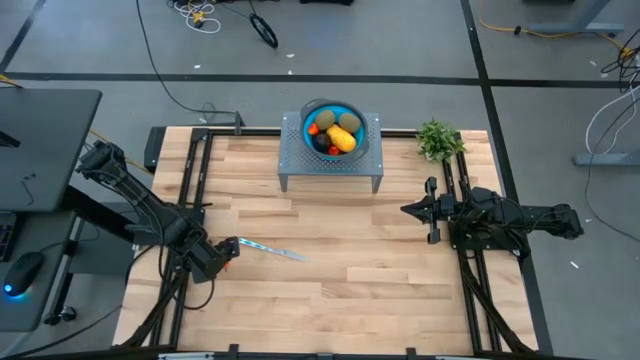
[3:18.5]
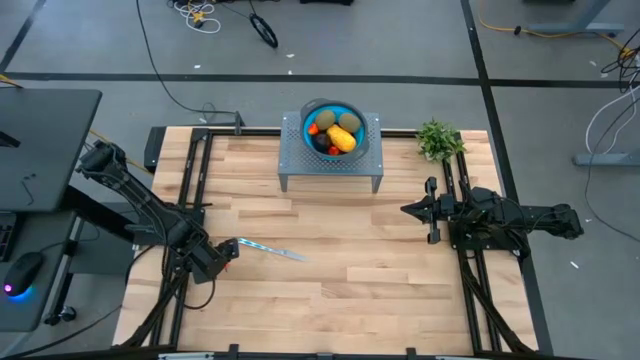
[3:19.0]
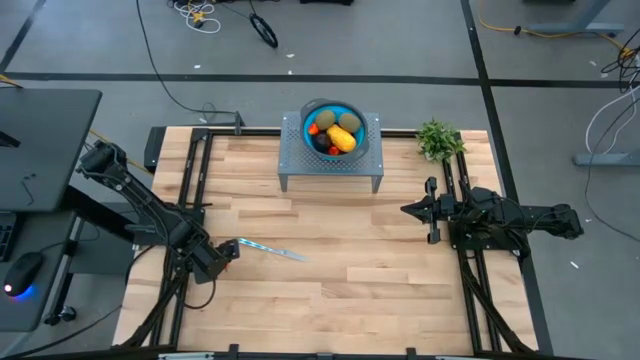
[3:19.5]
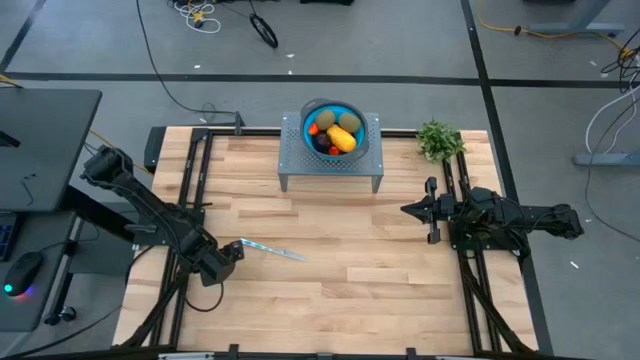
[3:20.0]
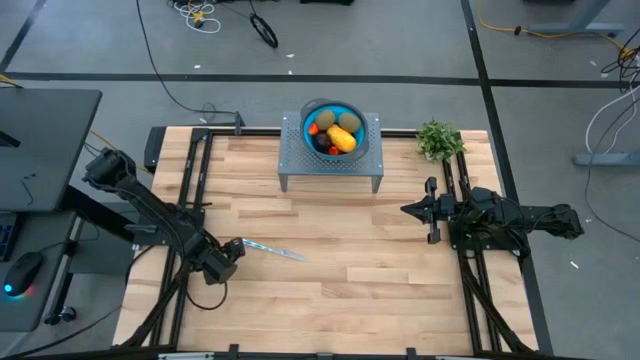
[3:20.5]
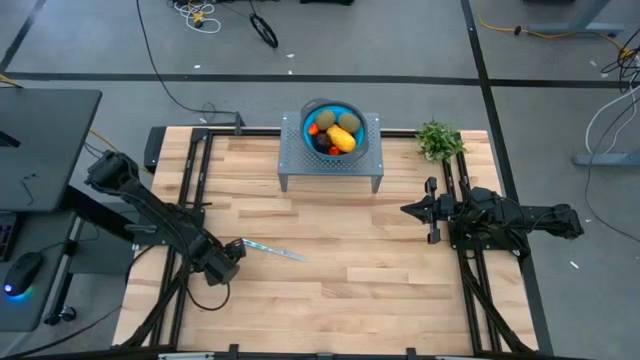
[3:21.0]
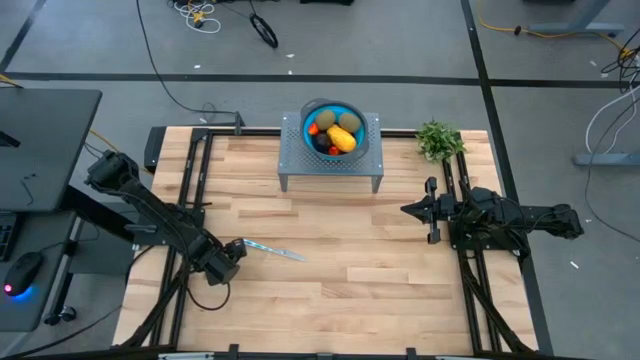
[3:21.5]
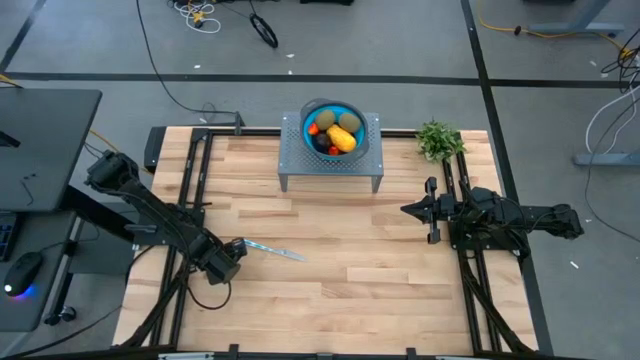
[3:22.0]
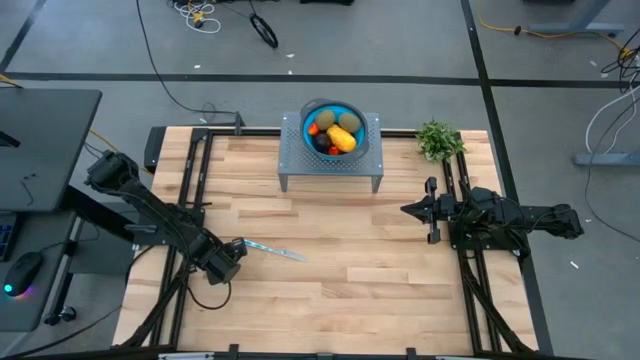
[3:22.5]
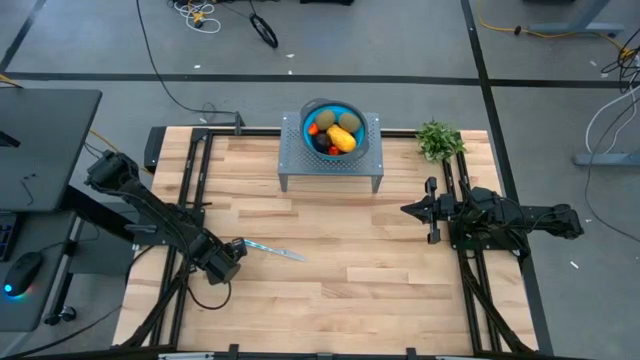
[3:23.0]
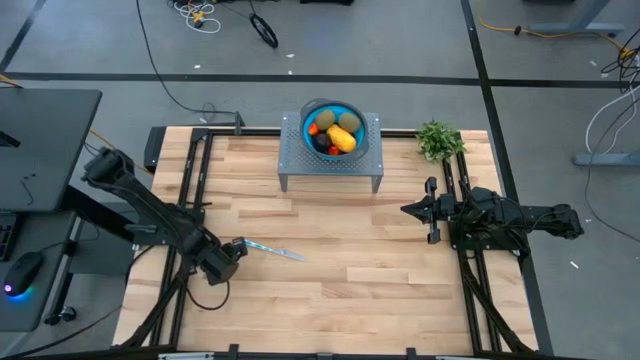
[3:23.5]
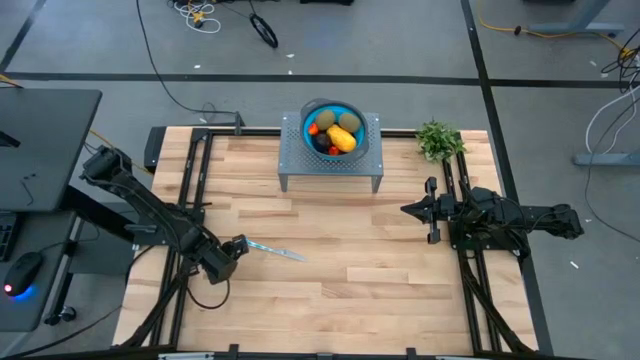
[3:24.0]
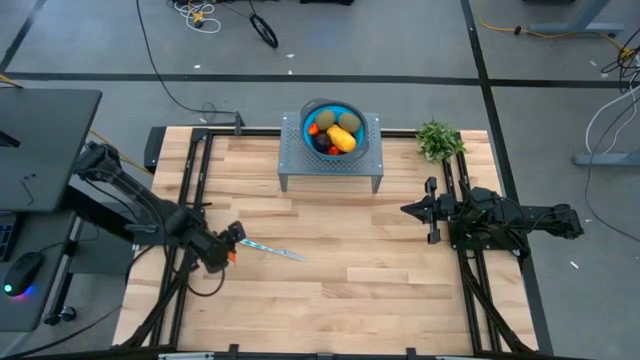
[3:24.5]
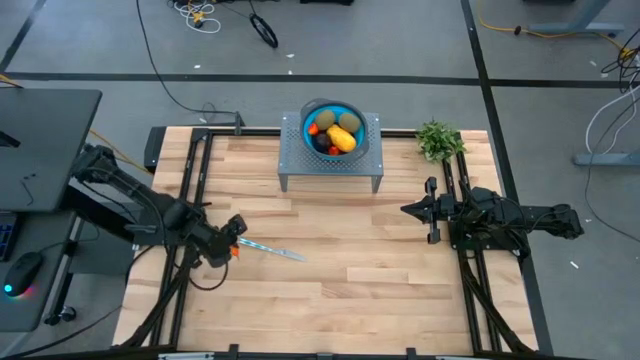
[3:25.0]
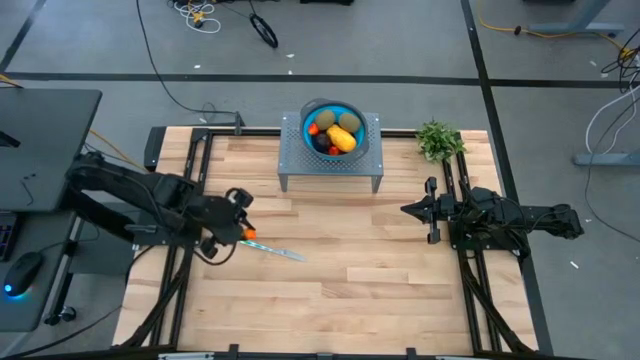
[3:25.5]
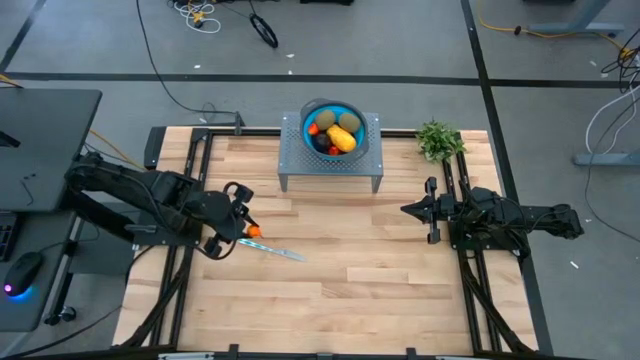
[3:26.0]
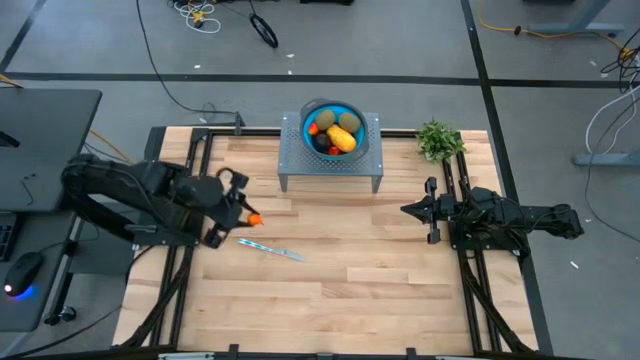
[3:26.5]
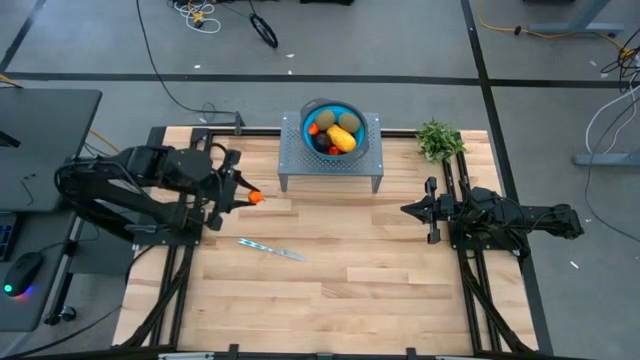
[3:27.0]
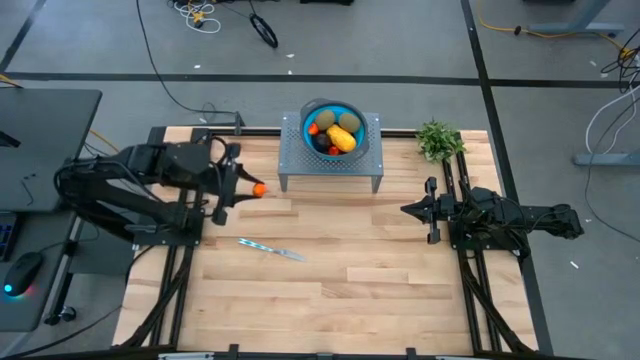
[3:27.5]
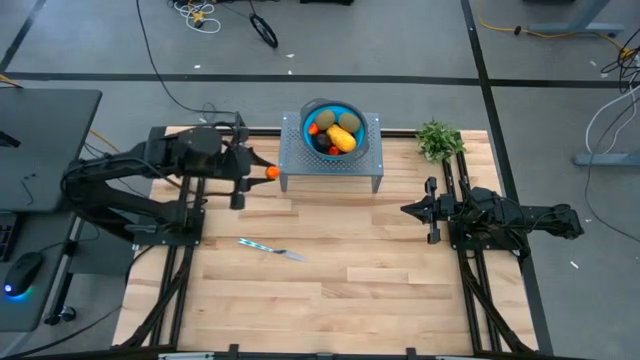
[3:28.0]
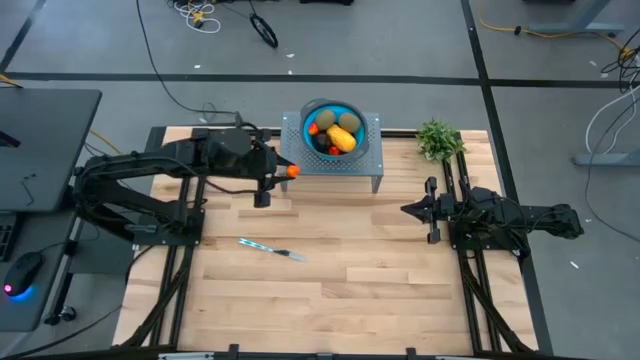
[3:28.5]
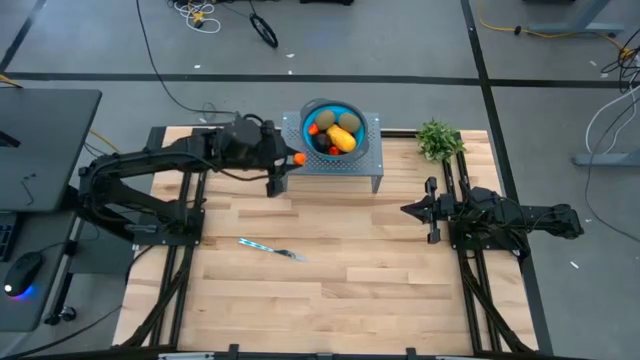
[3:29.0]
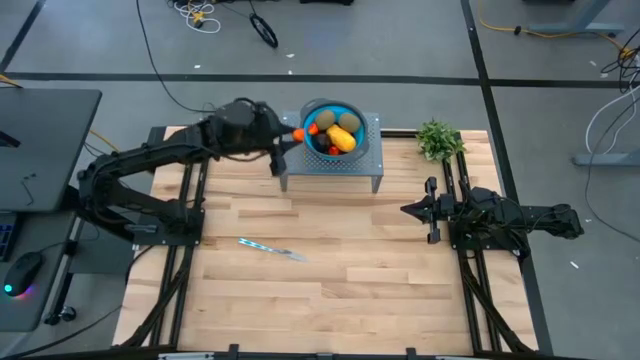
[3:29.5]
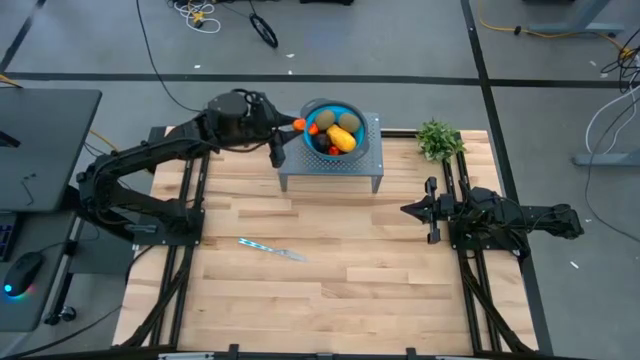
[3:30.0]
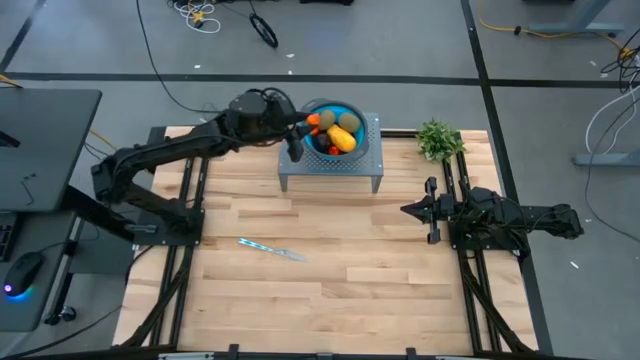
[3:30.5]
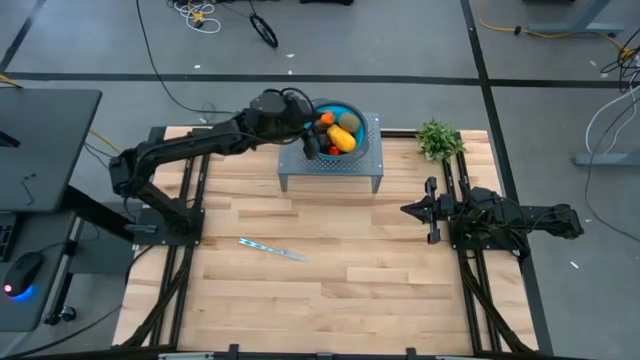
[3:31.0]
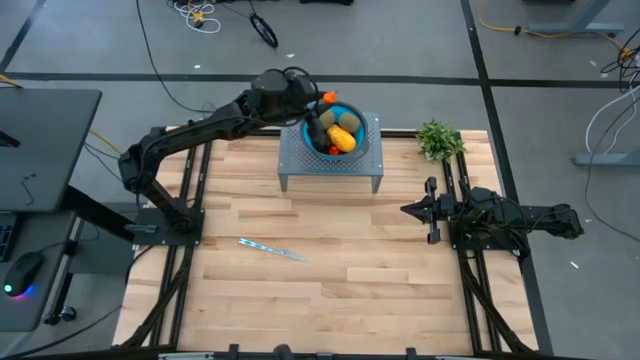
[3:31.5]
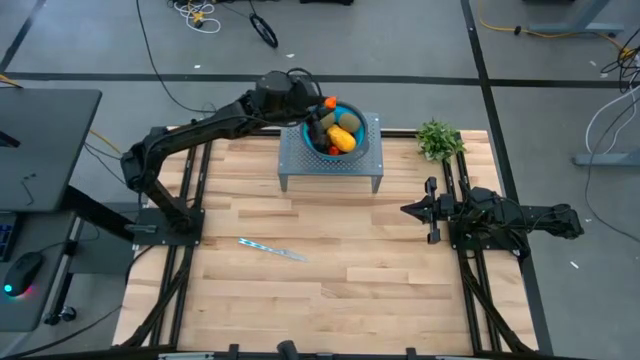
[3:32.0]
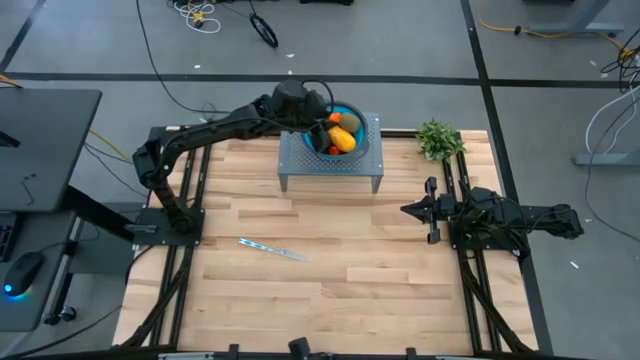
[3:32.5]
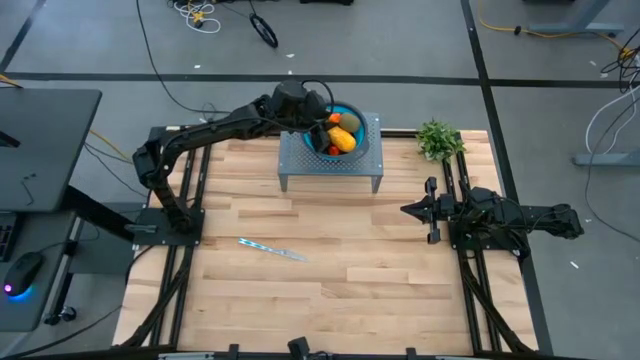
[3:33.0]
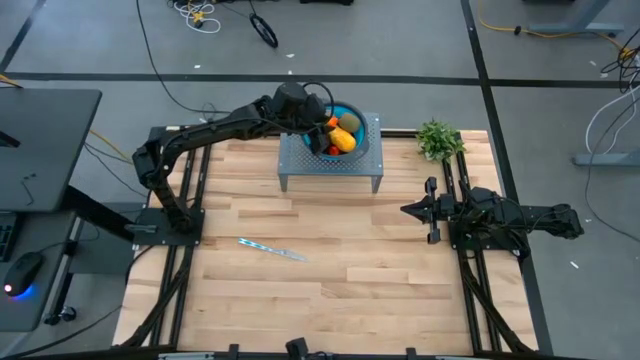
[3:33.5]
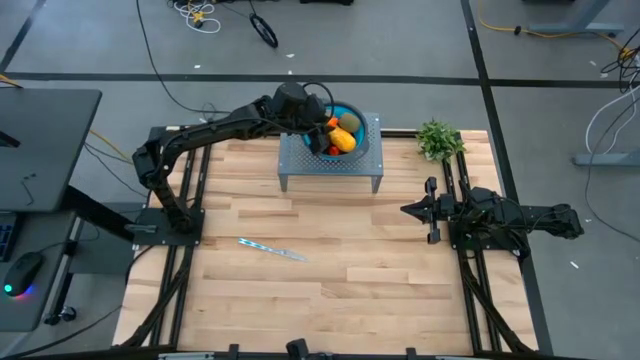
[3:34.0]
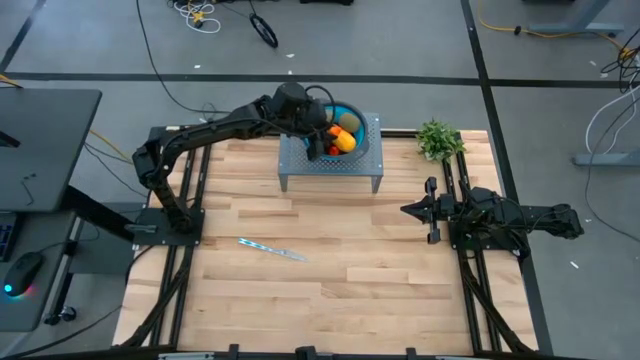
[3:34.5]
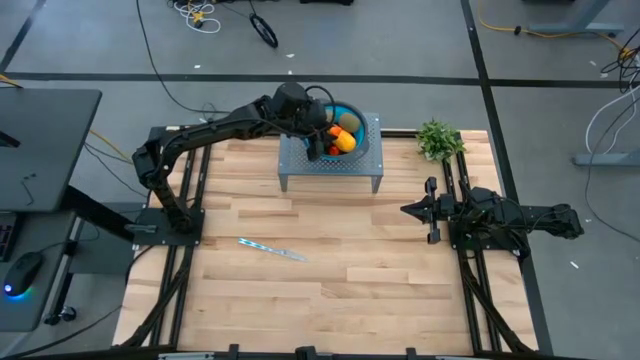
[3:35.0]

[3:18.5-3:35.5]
Task: Pick & Place Fruit
Put the peach into the blue bin
